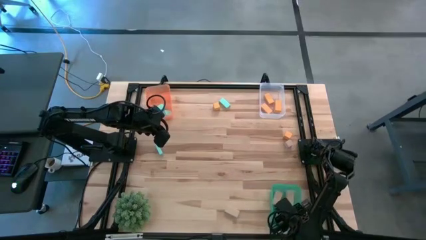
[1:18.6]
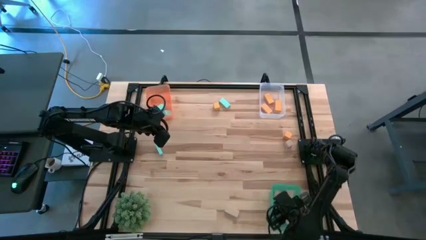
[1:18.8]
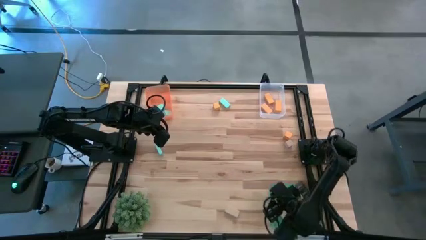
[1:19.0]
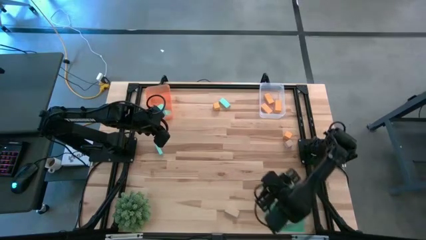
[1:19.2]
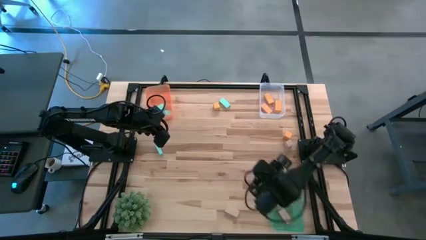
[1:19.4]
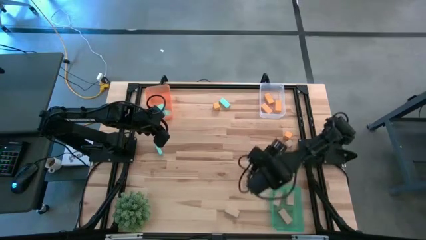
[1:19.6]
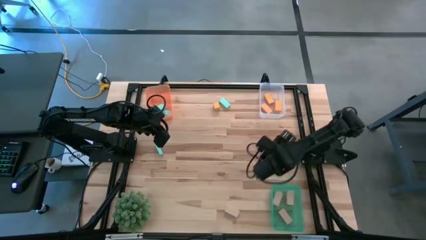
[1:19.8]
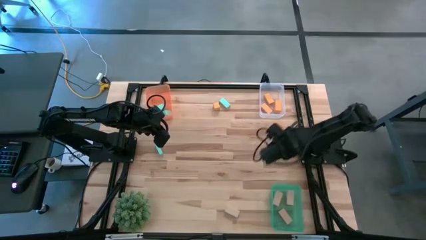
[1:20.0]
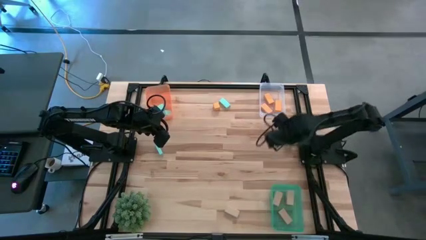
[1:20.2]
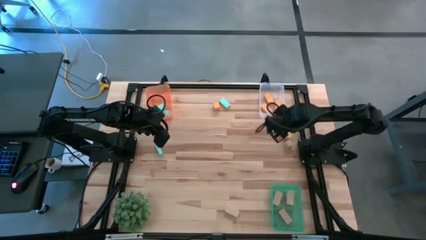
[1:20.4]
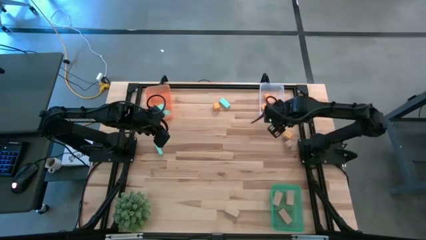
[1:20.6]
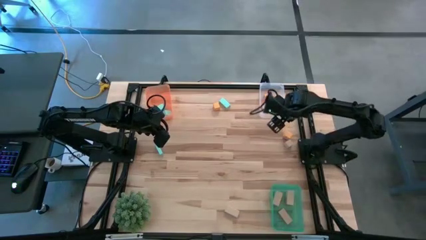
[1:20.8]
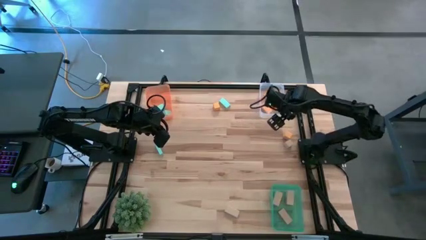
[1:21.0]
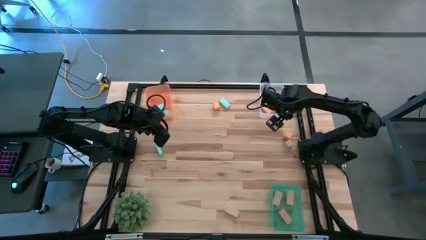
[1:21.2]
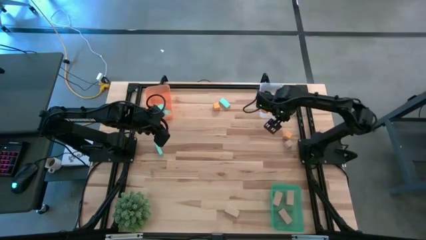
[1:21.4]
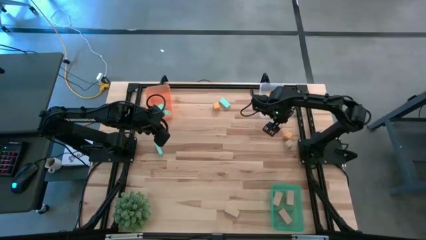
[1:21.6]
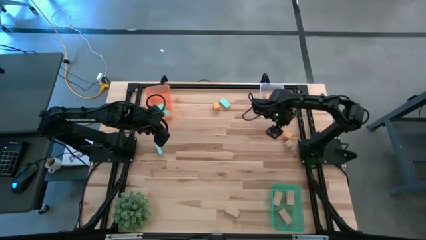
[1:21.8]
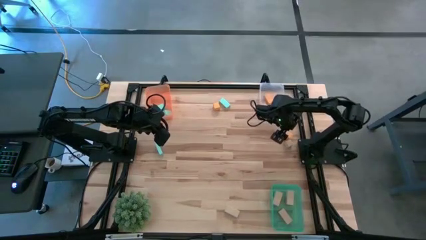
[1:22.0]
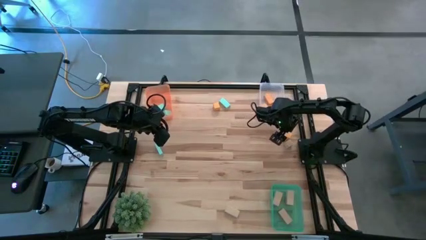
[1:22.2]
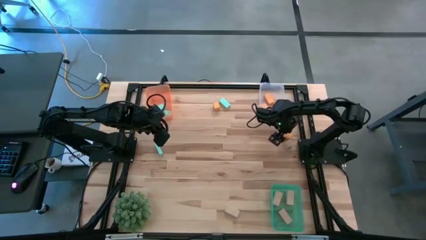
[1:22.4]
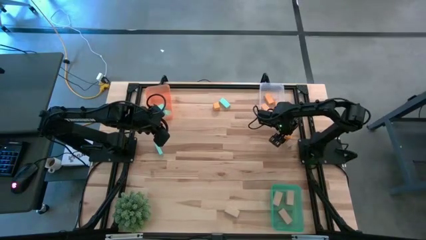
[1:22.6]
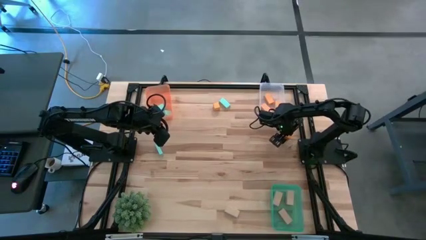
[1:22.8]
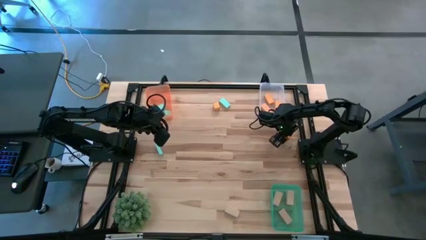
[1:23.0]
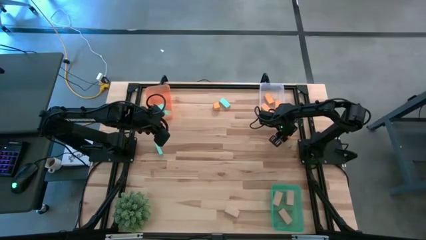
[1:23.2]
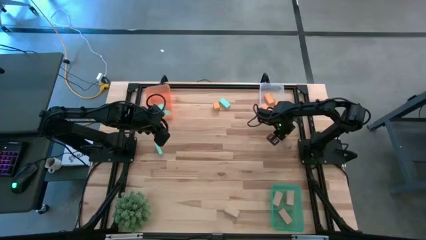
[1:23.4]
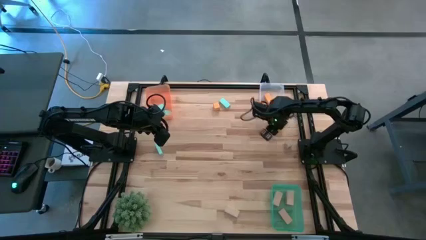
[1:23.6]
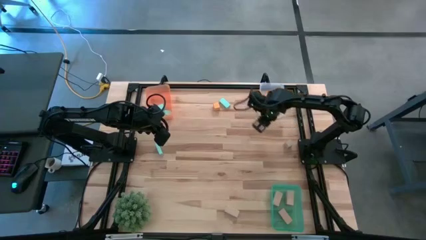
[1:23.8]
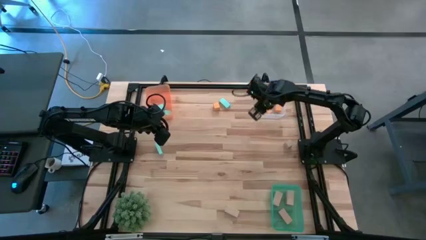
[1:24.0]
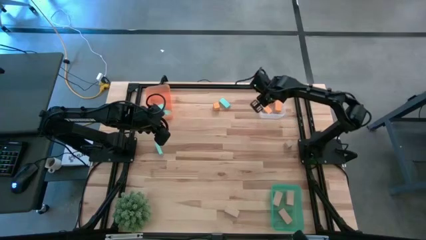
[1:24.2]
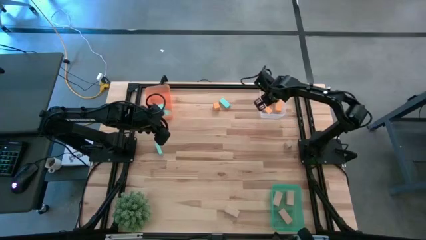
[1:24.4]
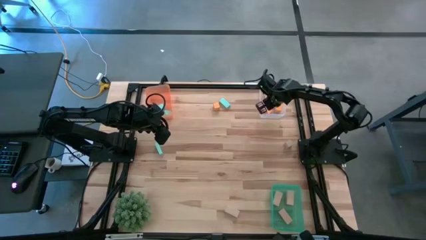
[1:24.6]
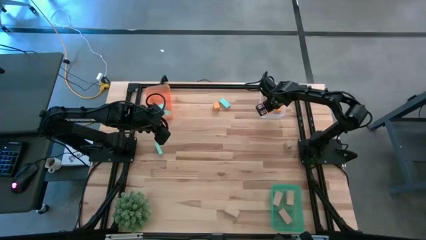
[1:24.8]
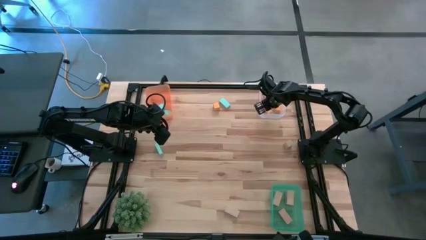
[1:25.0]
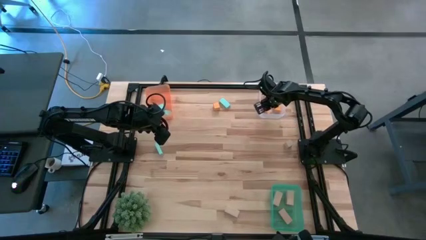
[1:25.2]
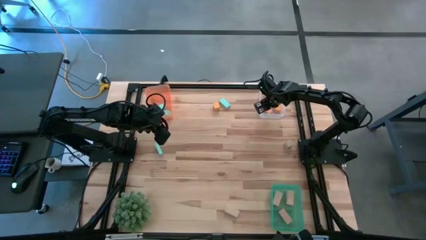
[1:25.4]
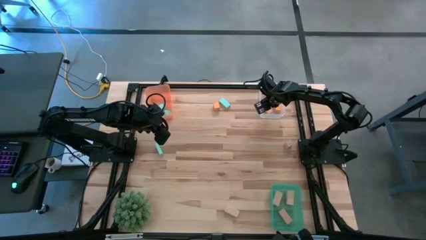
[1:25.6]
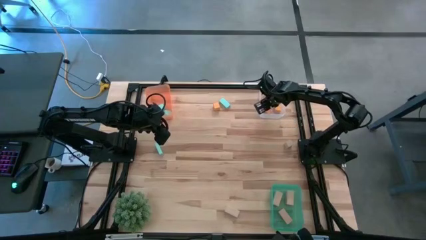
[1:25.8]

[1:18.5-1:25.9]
Task: Sort & place blocks by color
Put the orange block into the transparent bin

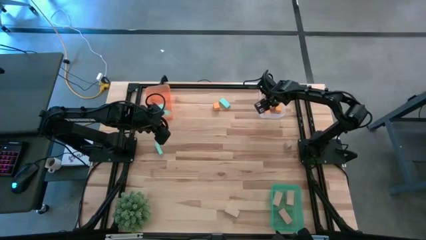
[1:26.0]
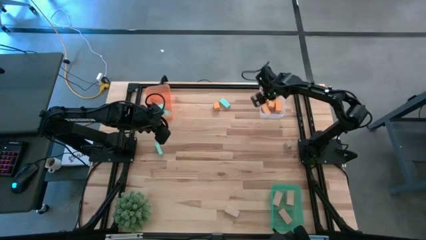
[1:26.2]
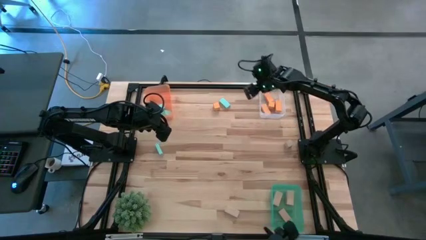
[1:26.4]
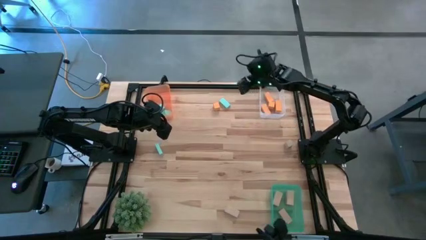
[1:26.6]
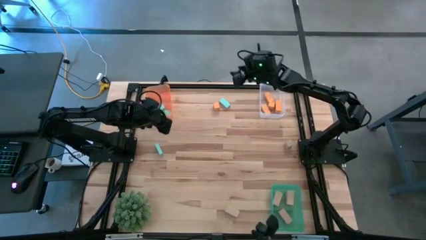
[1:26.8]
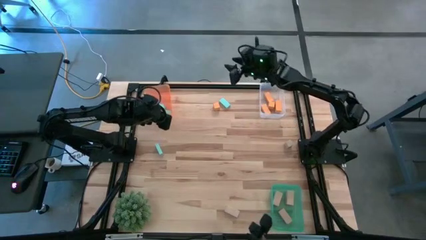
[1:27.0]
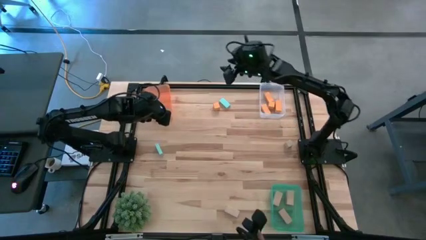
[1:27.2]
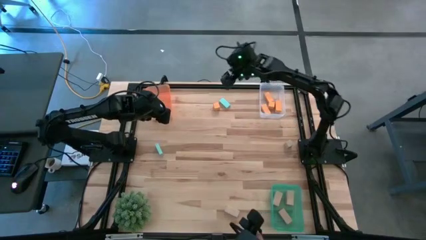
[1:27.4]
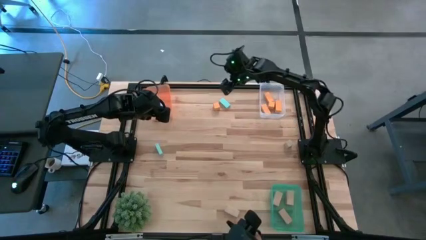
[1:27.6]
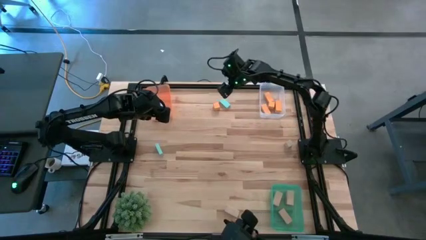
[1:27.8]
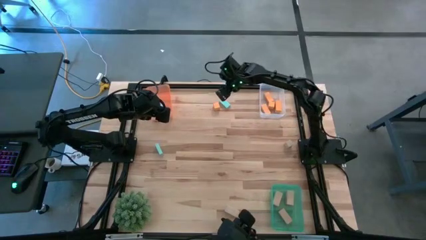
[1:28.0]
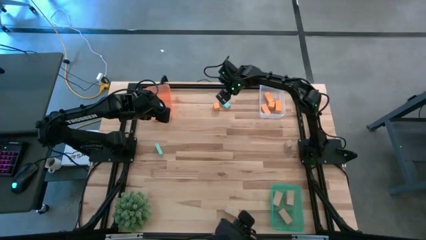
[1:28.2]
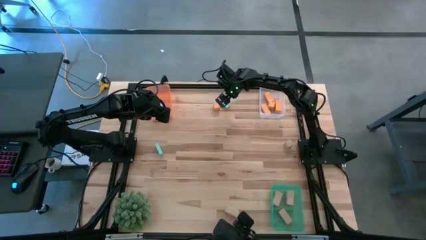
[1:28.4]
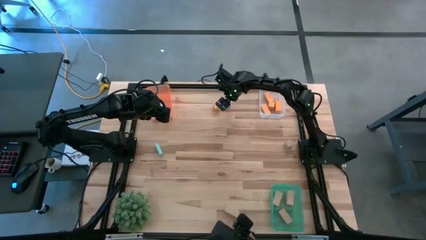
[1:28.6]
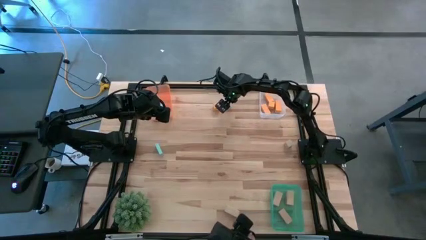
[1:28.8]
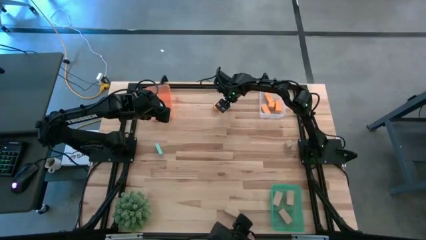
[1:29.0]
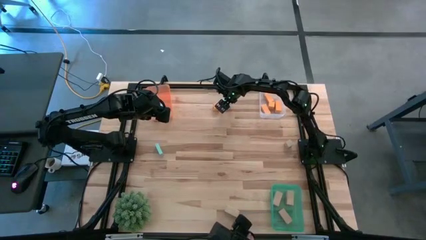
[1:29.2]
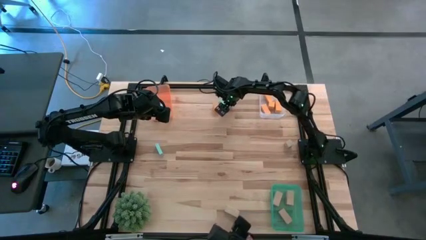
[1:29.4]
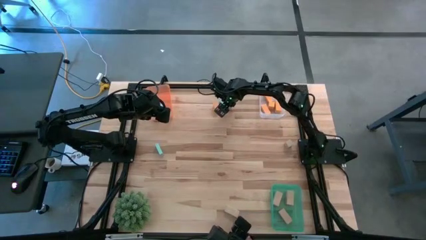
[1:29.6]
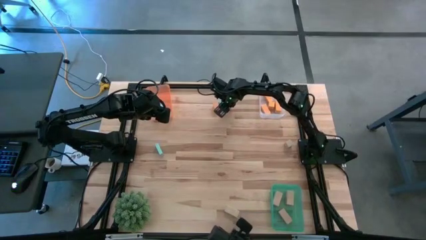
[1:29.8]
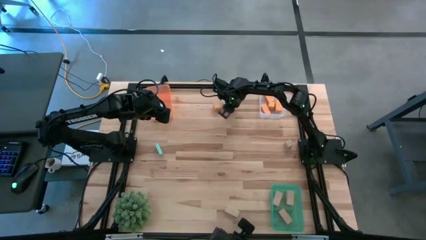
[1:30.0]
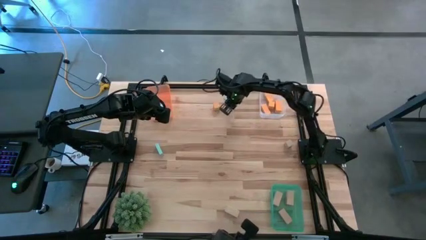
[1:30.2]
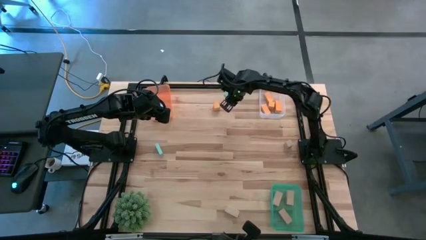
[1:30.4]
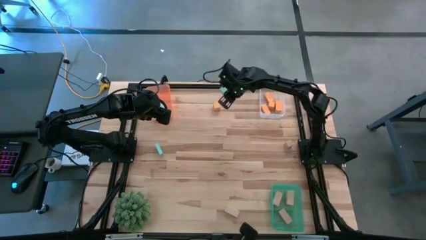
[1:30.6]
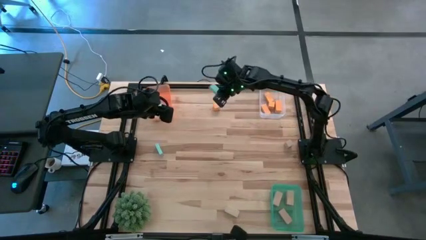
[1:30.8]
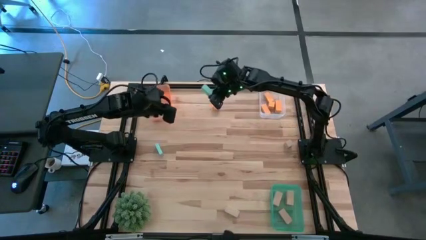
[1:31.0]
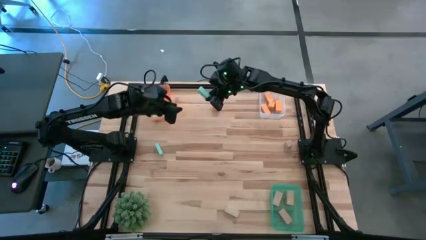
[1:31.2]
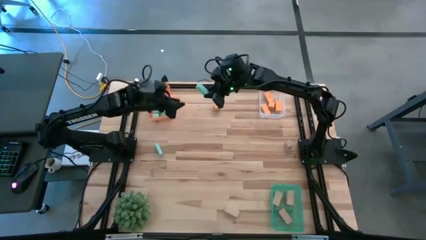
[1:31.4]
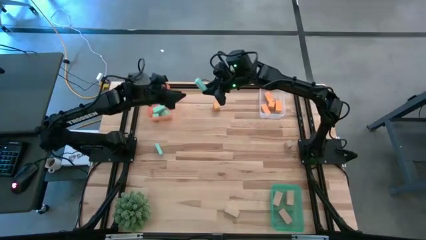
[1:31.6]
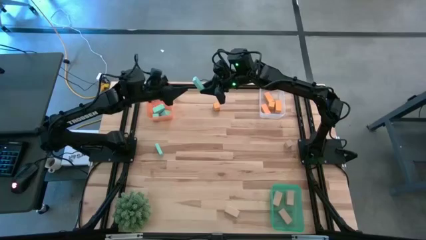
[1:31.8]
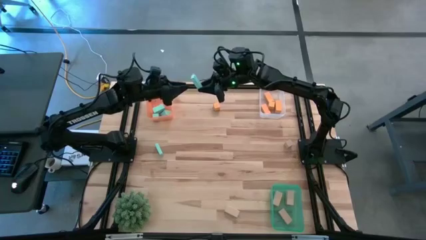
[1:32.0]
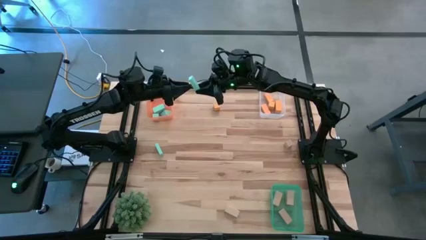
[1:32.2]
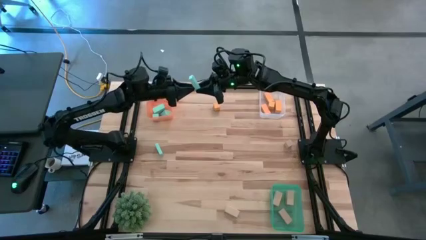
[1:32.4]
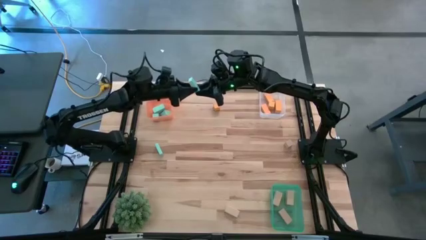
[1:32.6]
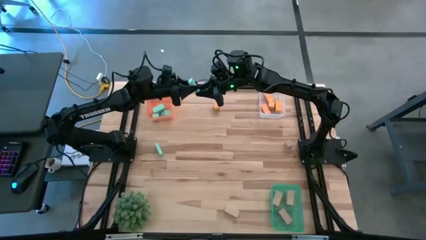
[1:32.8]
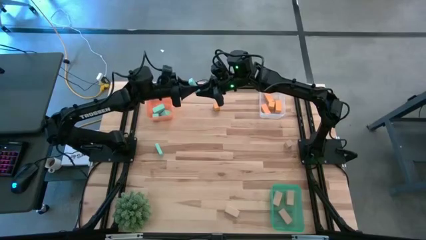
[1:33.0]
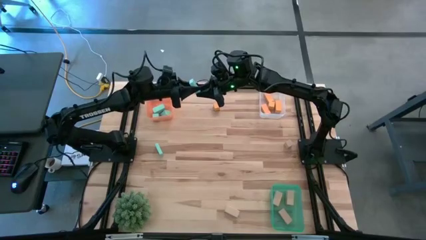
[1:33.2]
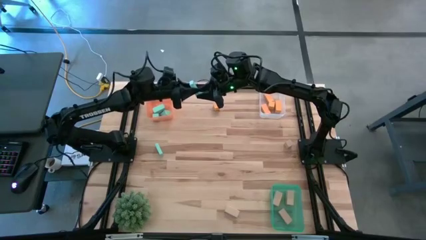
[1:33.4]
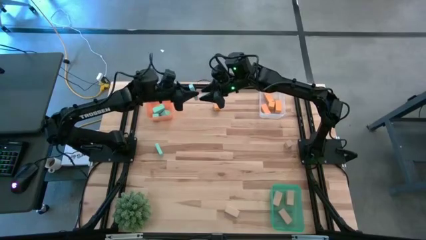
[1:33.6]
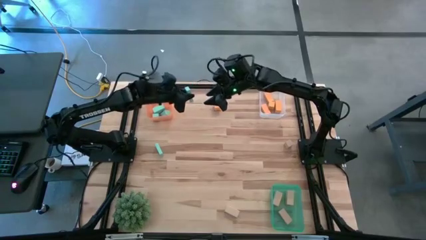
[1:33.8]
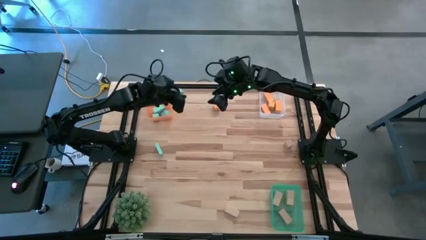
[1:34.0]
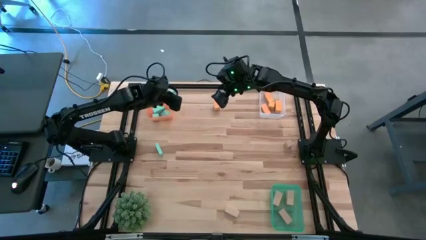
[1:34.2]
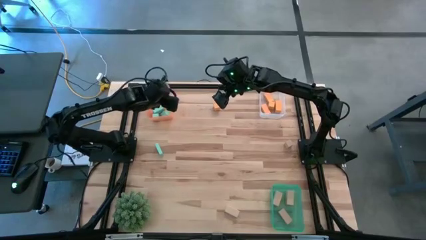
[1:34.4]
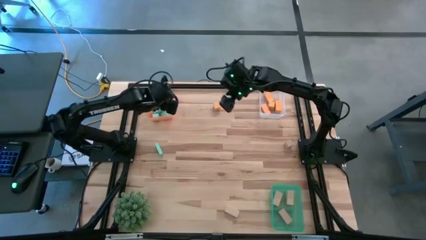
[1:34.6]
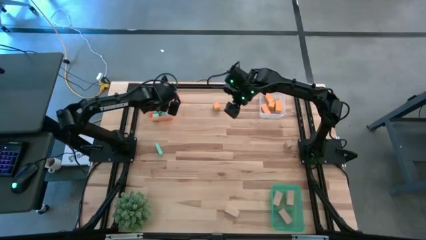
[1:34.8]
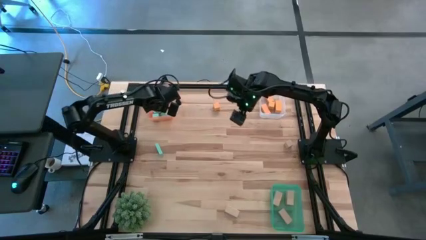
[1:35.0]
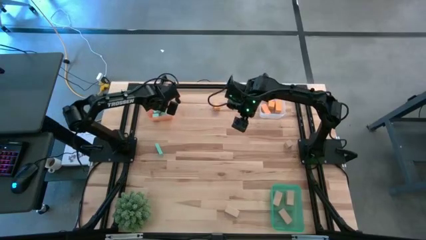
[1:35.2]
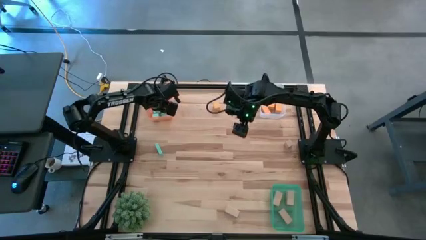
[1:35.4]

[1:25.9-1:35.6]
Put the blue block into the orange bin
